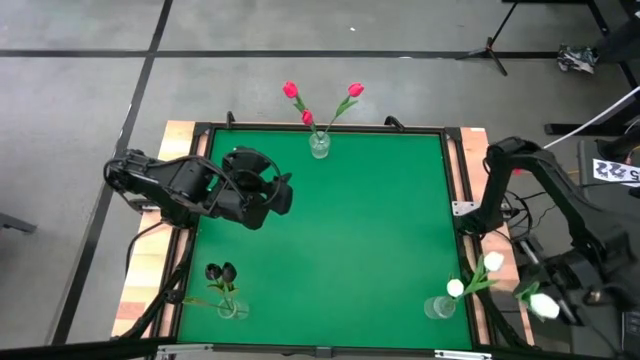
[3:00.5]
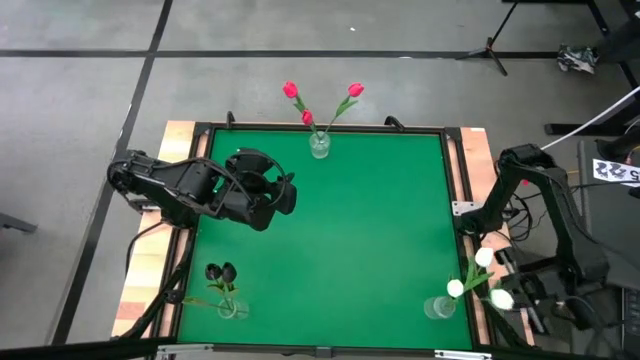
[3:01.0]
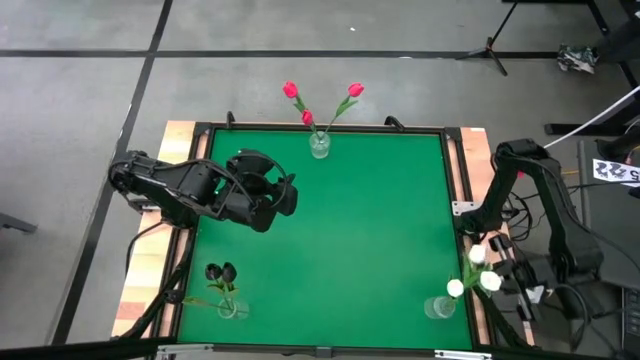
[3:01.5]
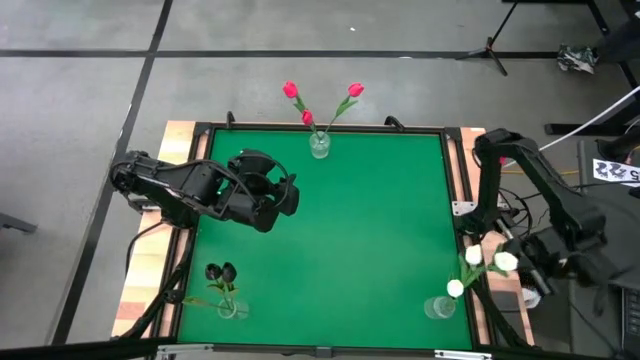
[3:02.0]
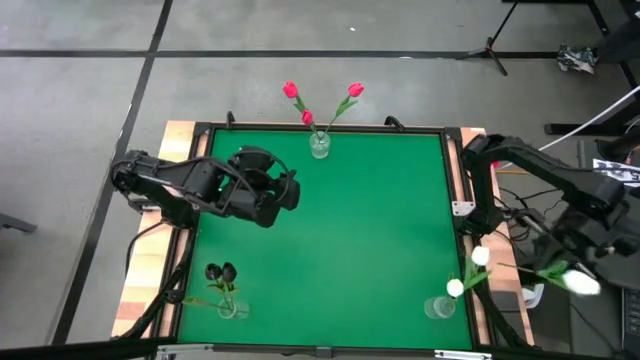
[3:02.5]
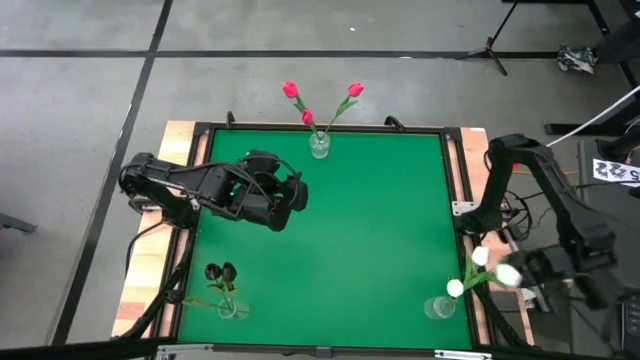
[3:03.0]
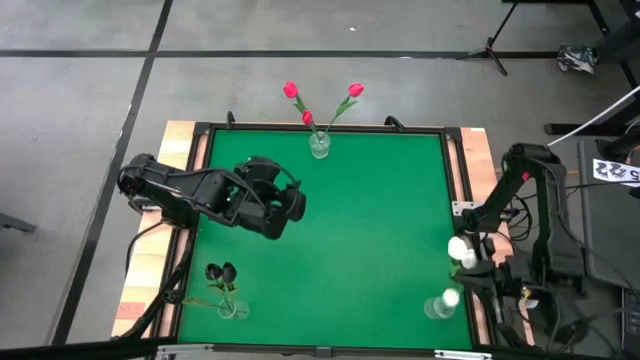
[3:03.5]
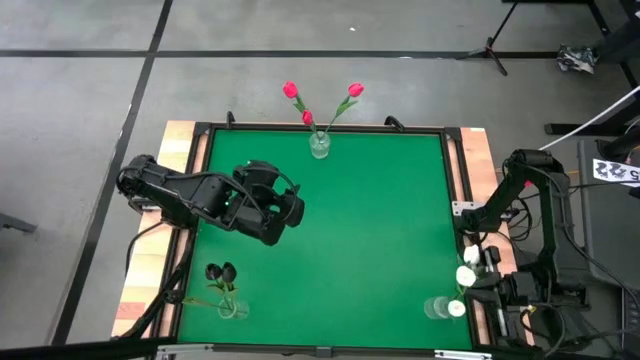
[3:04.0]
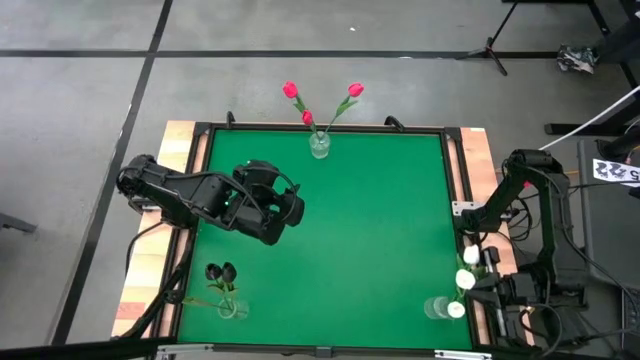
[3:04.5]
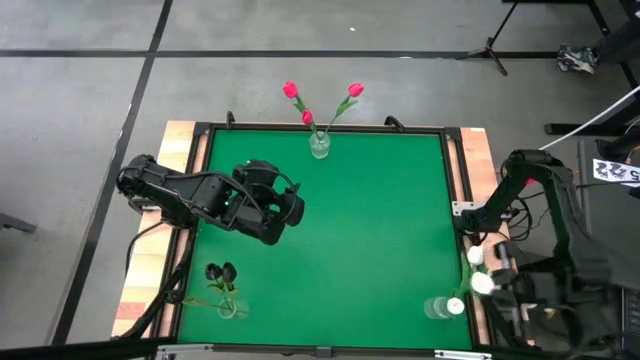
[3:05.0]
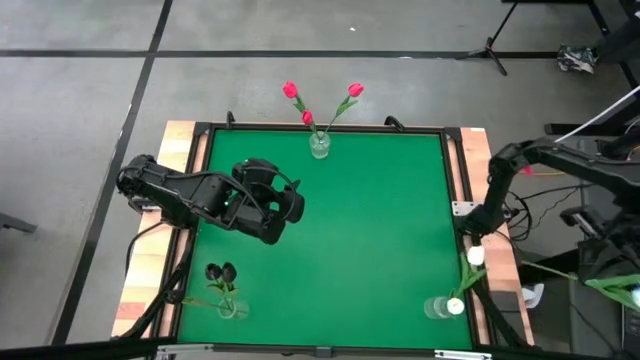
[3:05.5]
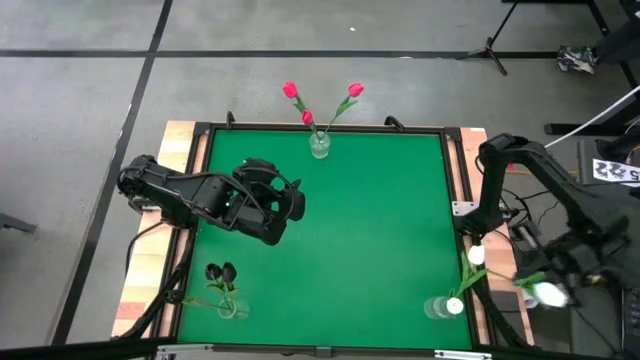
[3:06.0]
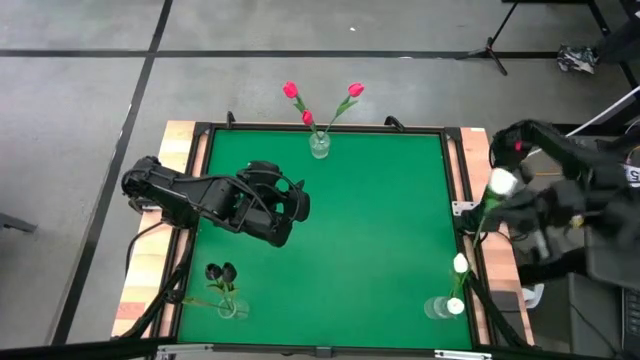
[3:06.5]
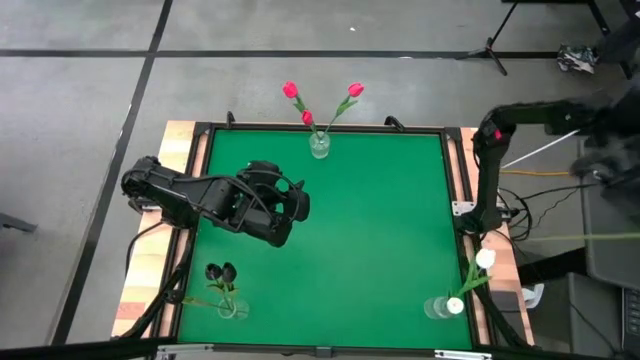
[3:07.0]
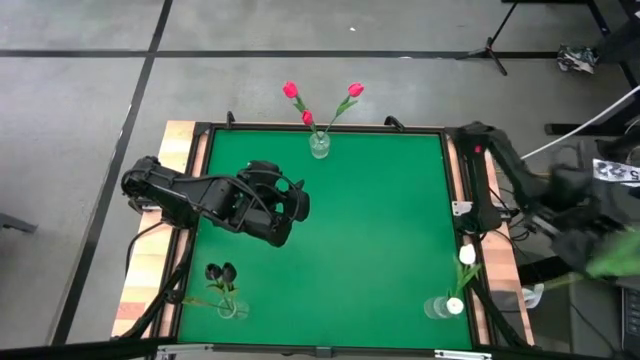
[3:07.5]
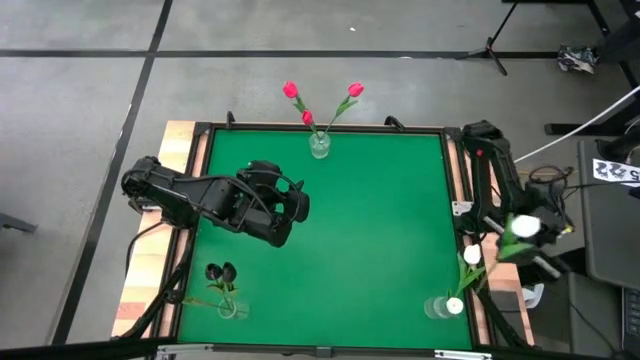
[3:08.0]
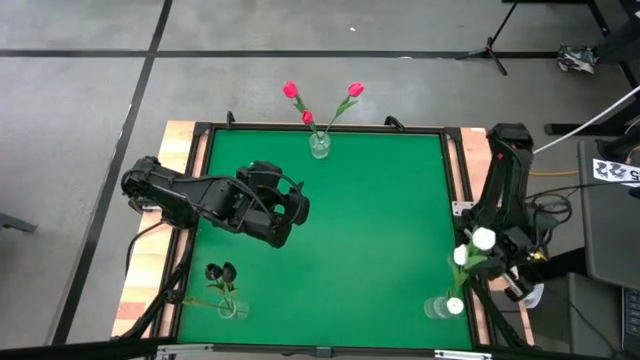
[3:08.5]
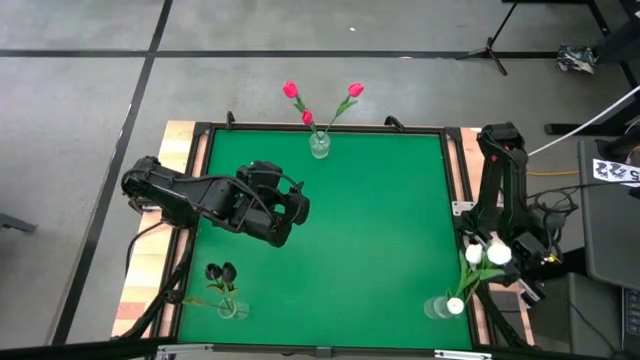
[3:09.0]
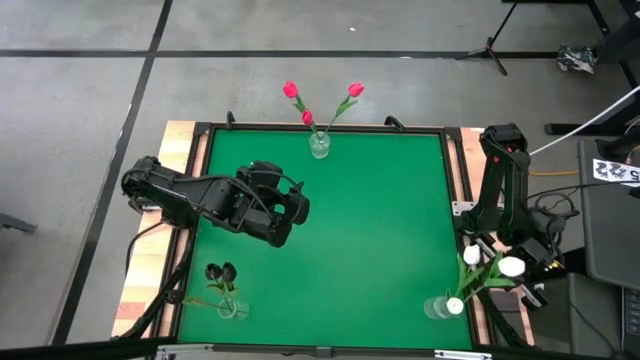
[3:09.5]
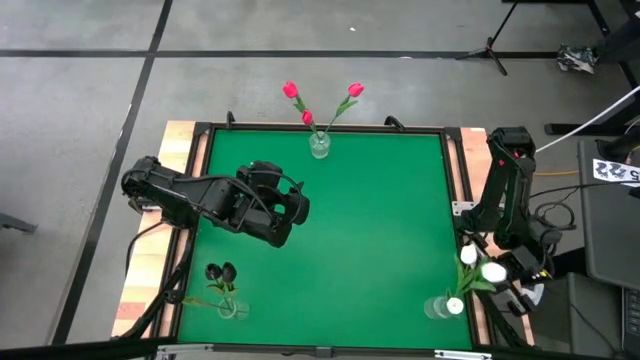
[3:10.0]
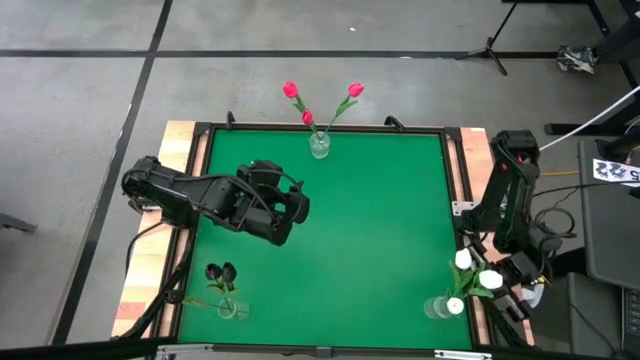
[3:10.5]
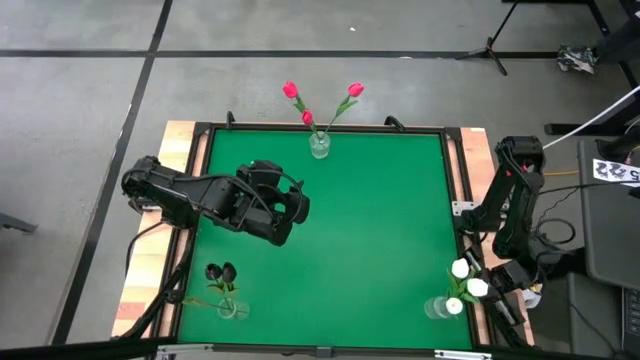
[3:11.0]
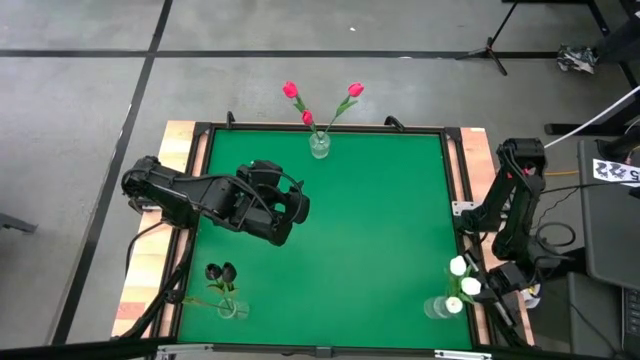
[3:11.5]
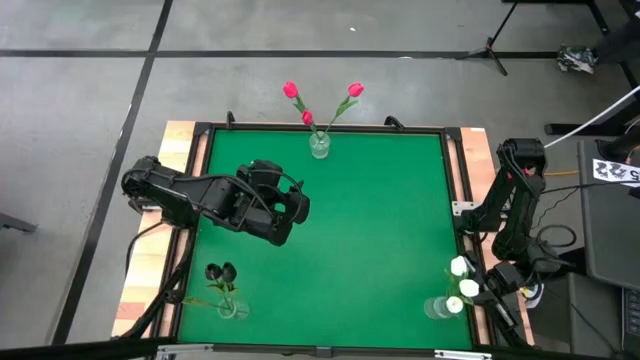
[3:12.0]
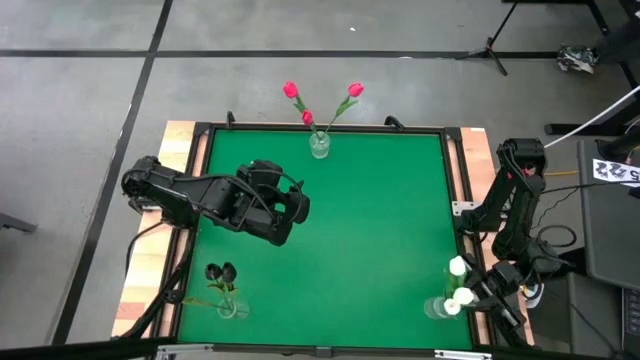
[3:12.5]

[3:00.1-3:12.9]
Task: Sort flowers into vase by color
Put the white flower into the bottom right transparent vase

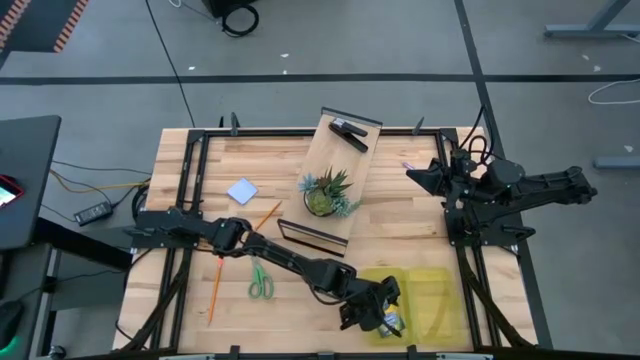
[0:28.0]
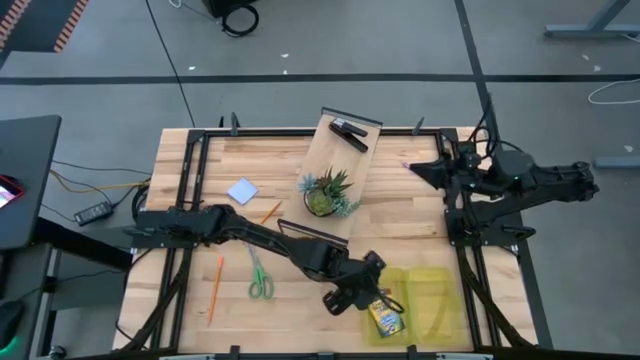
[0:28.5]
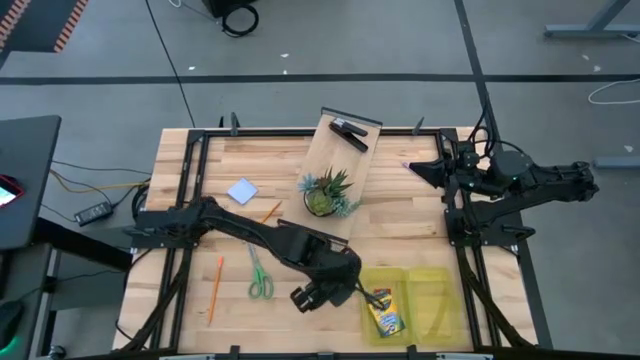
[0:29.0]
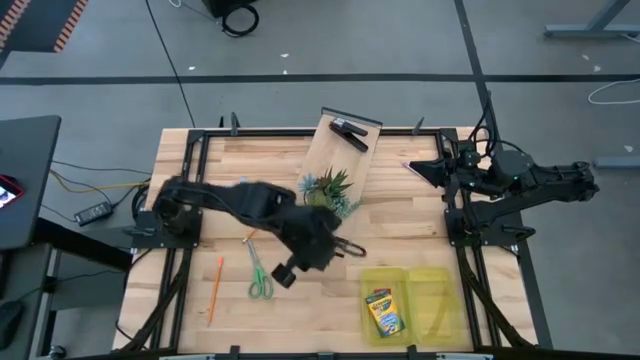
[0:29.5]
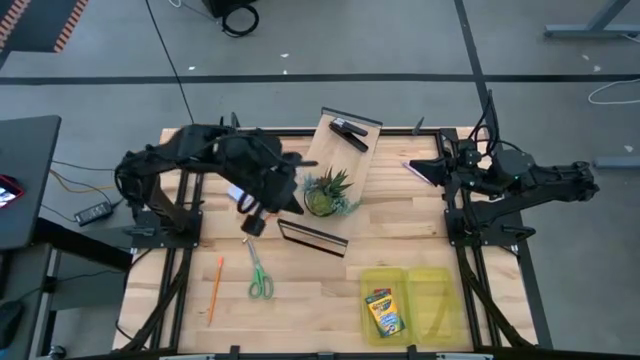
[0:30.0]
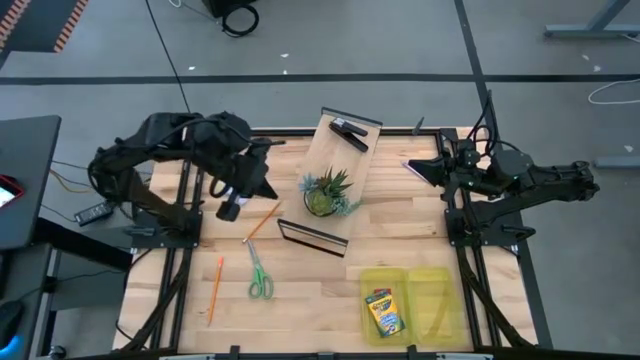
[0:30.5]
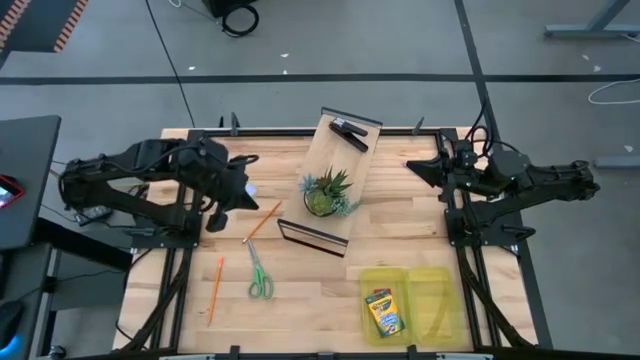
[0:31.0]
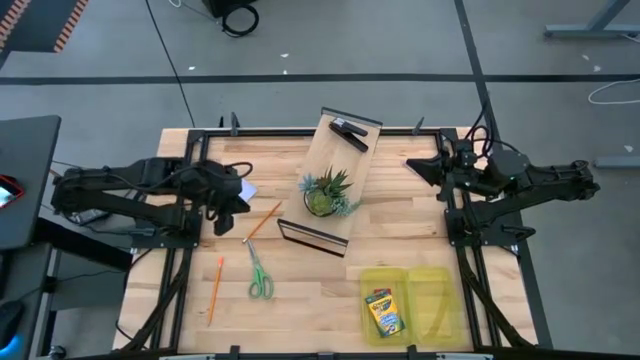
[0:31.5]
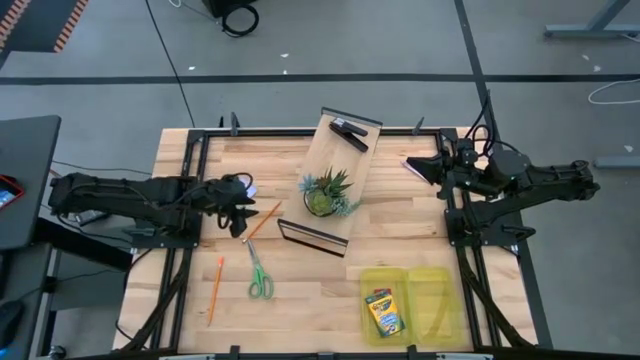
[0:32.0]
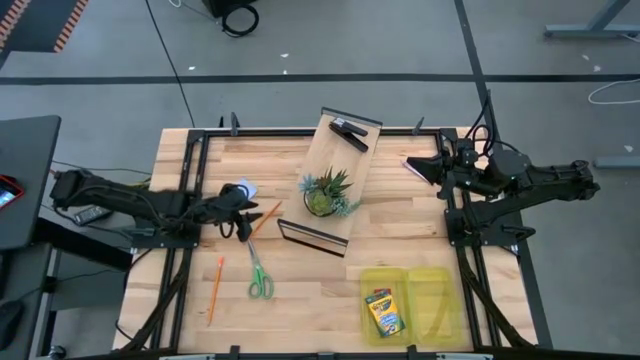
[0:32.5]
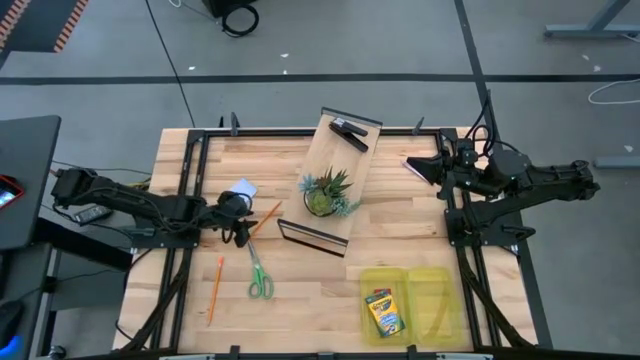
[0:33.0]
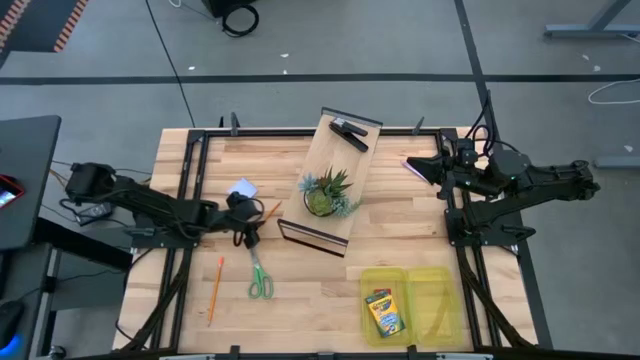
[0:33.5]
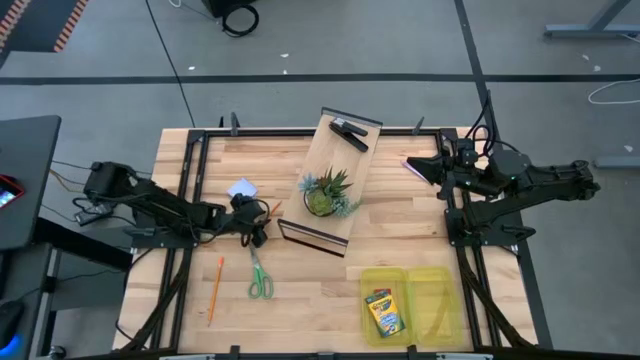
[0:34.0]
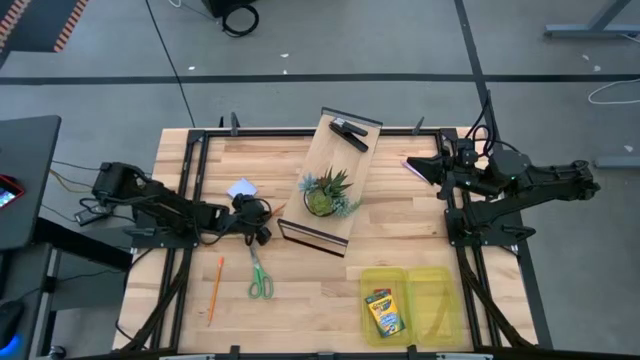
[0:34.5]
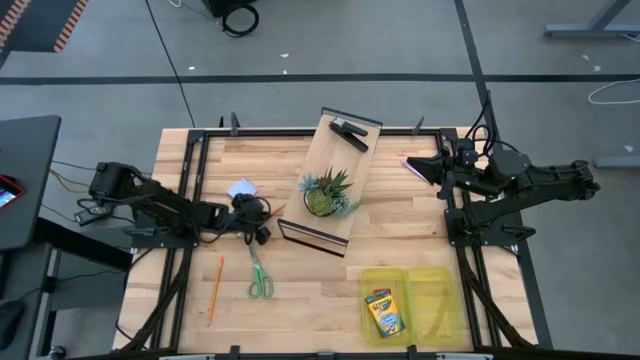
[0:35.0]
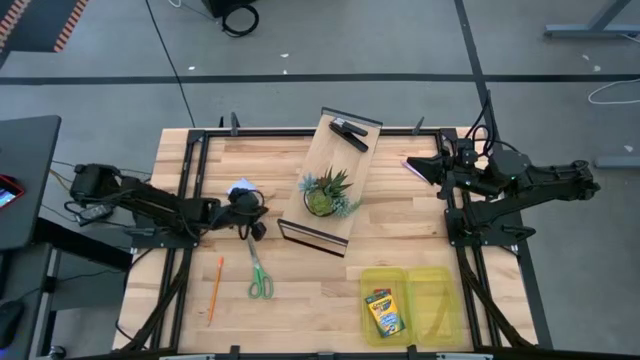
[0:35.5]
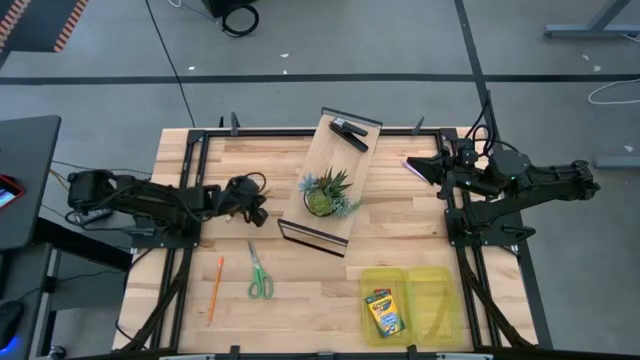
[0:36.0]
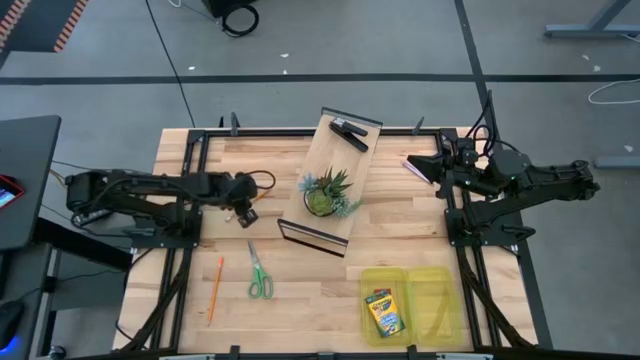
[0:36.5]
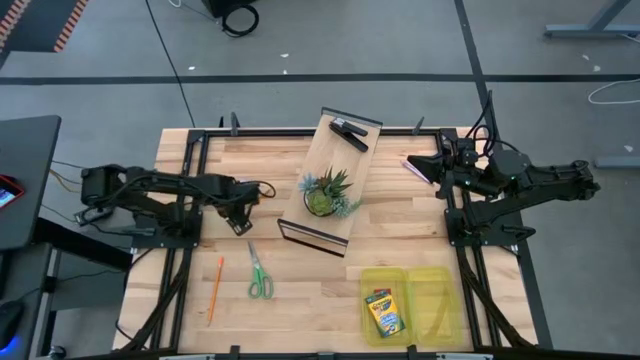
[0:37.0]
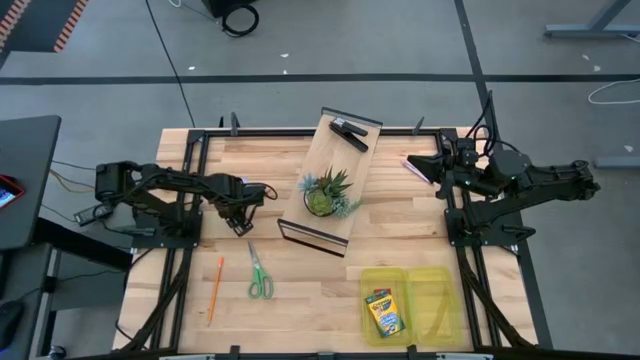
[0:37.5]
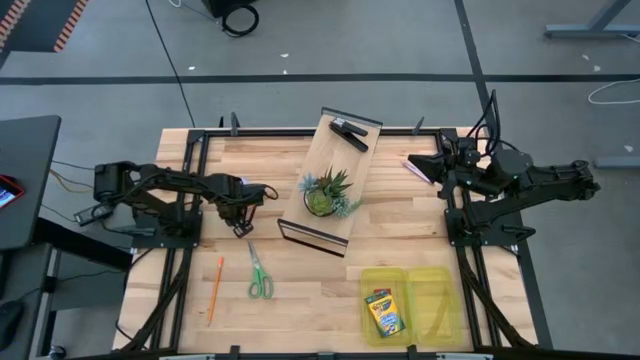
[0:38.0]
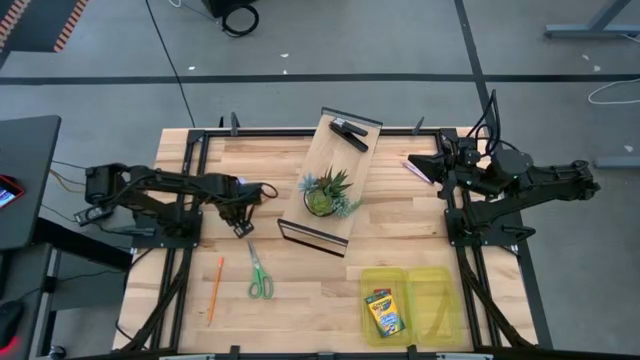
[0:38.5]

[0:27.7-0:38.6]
Task: Pack school essentials
Put the top orange pencil into the yellow supply box
